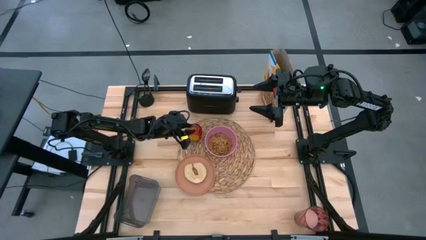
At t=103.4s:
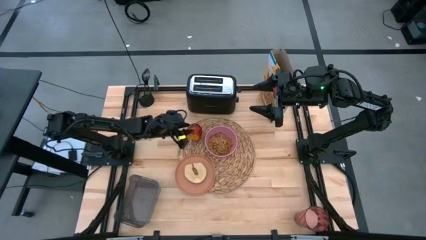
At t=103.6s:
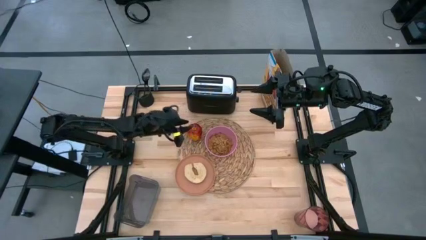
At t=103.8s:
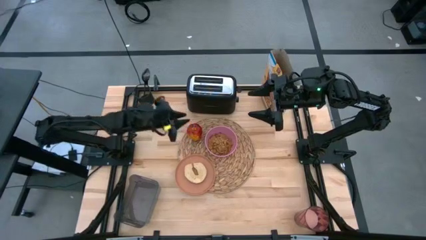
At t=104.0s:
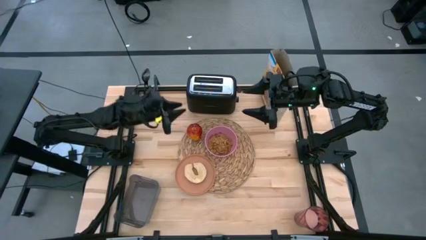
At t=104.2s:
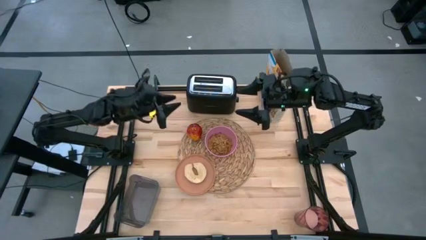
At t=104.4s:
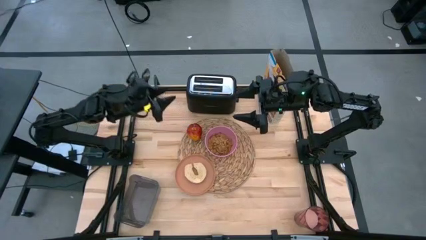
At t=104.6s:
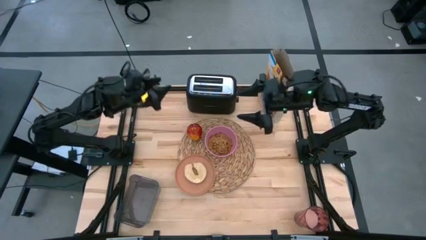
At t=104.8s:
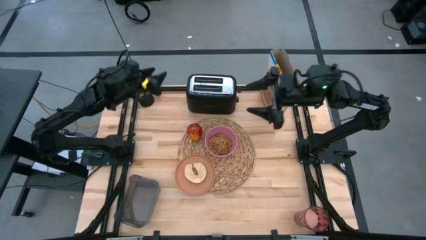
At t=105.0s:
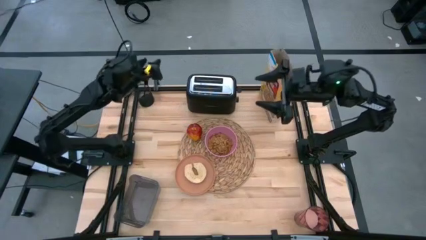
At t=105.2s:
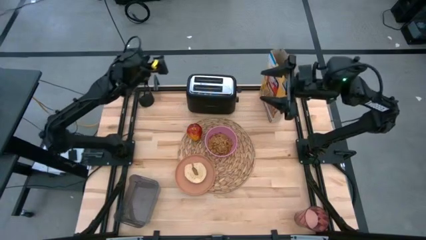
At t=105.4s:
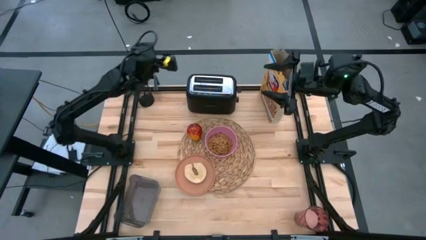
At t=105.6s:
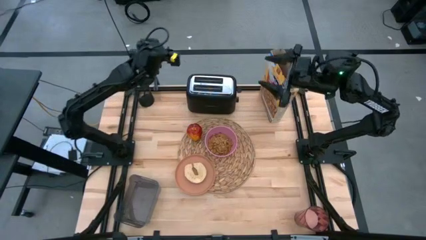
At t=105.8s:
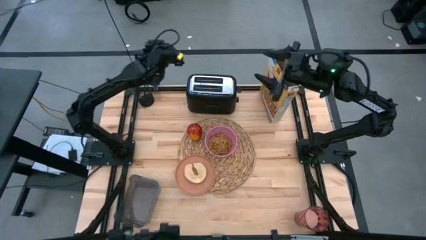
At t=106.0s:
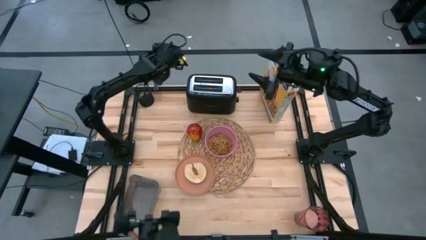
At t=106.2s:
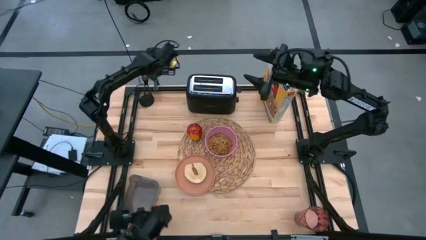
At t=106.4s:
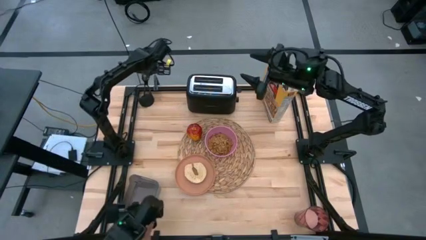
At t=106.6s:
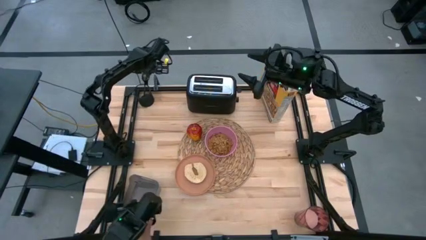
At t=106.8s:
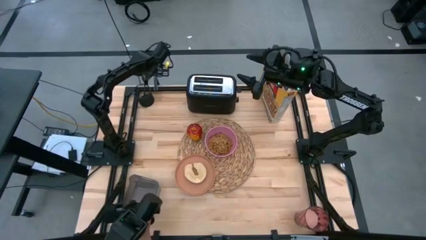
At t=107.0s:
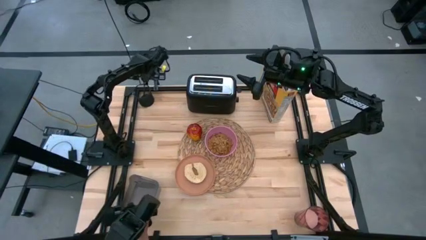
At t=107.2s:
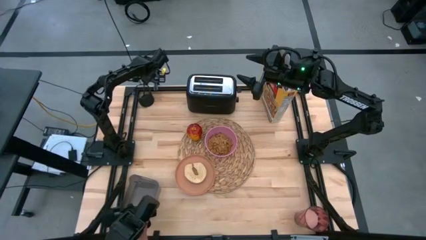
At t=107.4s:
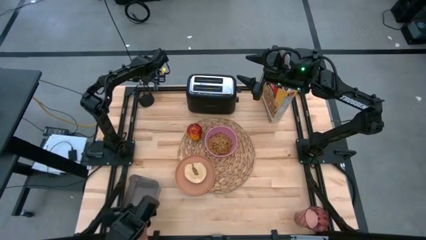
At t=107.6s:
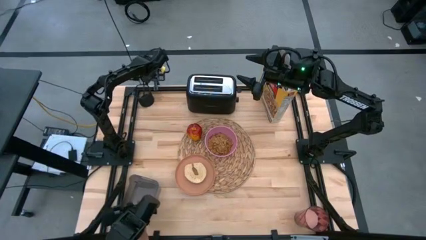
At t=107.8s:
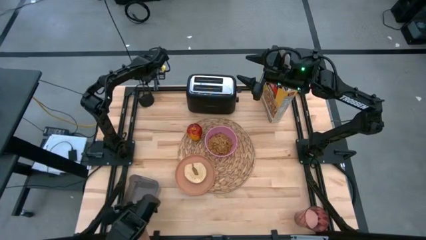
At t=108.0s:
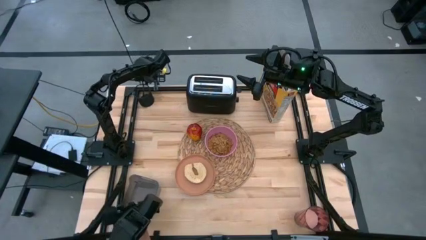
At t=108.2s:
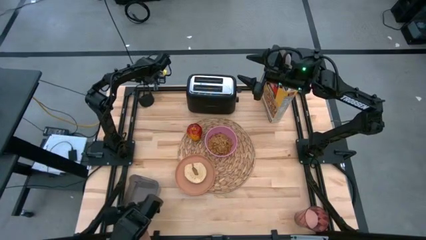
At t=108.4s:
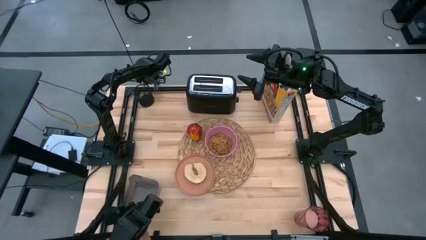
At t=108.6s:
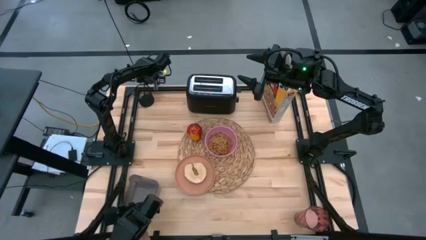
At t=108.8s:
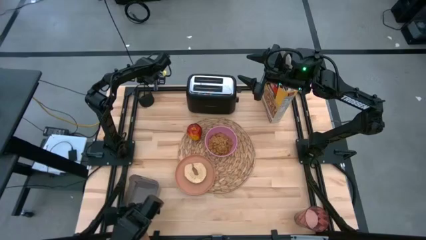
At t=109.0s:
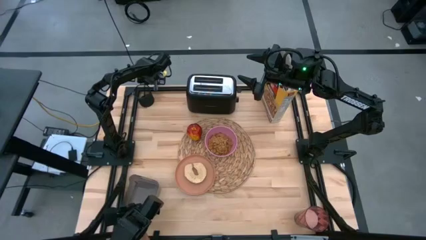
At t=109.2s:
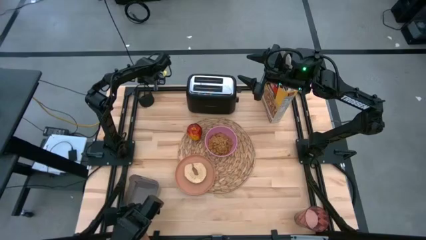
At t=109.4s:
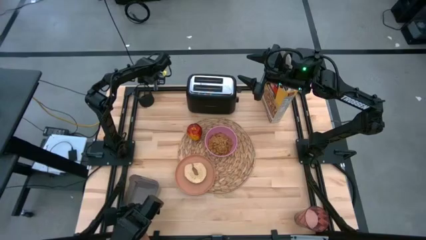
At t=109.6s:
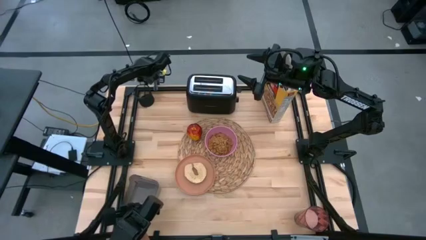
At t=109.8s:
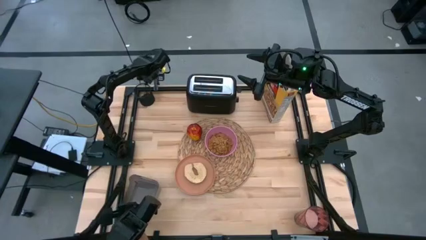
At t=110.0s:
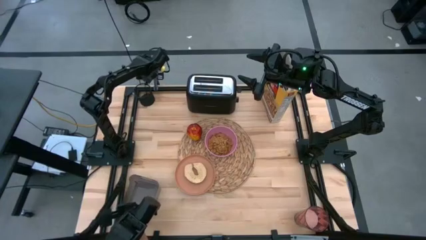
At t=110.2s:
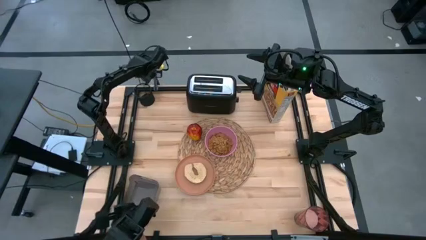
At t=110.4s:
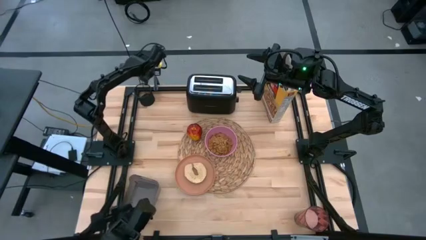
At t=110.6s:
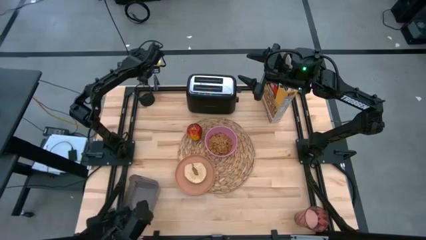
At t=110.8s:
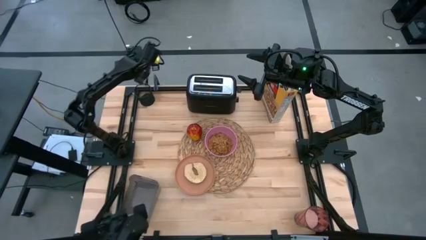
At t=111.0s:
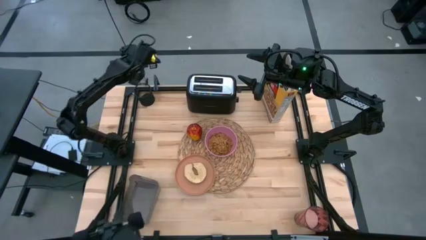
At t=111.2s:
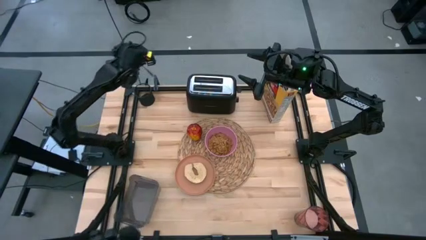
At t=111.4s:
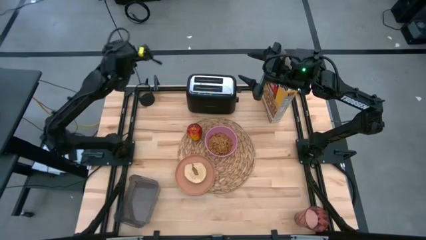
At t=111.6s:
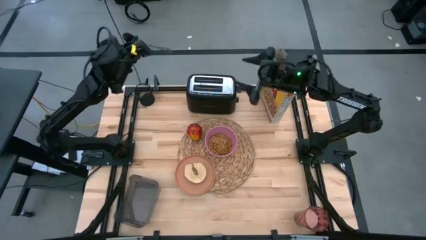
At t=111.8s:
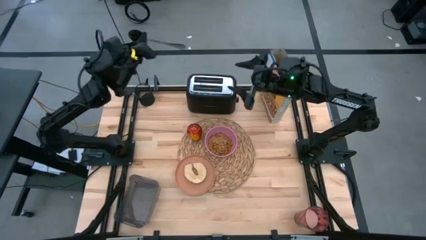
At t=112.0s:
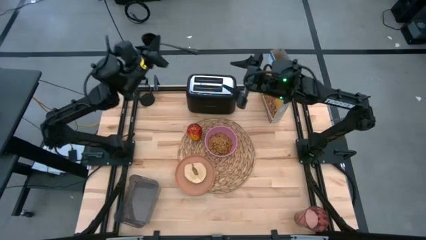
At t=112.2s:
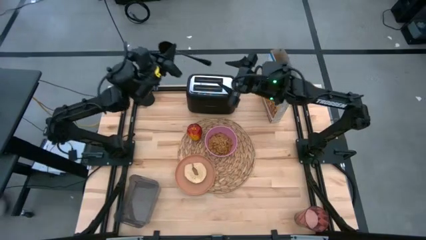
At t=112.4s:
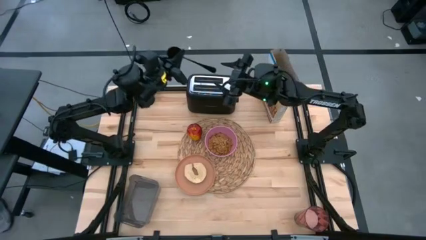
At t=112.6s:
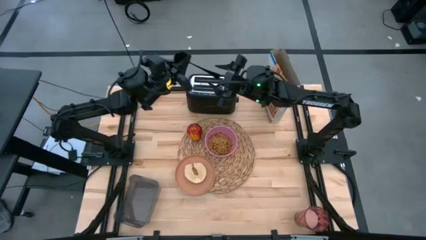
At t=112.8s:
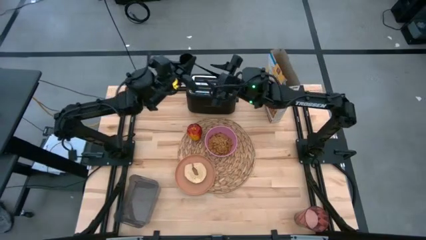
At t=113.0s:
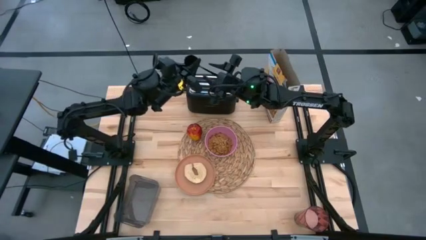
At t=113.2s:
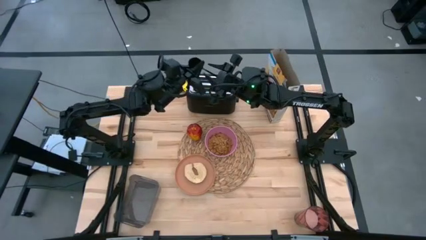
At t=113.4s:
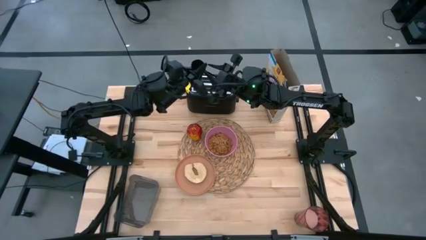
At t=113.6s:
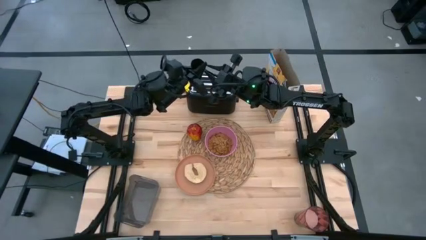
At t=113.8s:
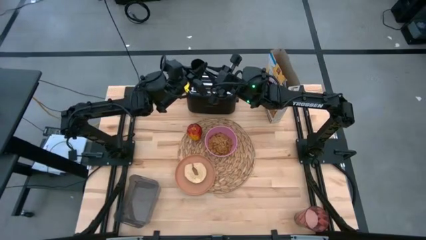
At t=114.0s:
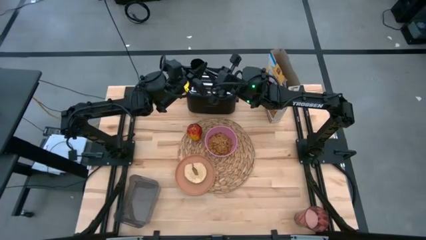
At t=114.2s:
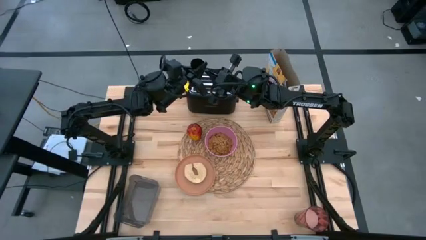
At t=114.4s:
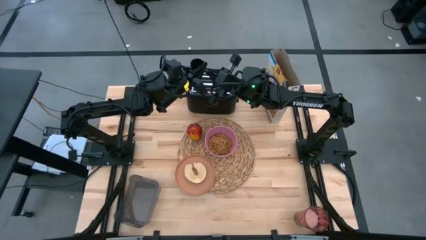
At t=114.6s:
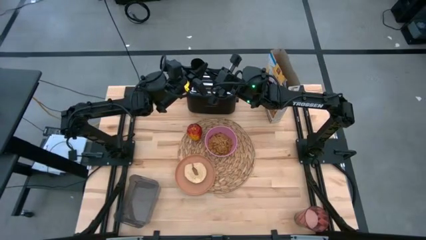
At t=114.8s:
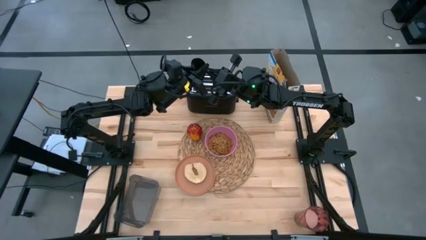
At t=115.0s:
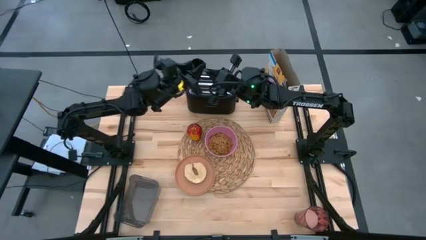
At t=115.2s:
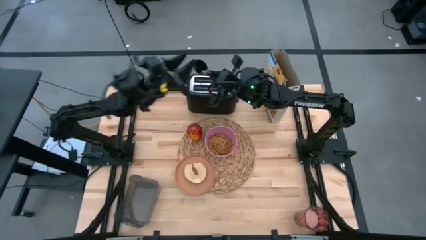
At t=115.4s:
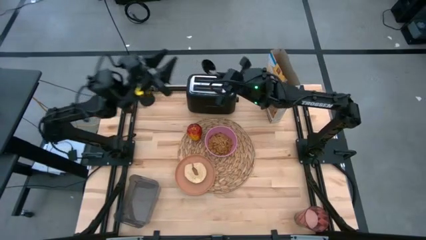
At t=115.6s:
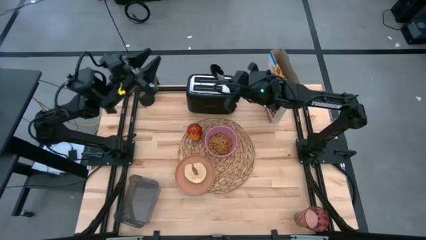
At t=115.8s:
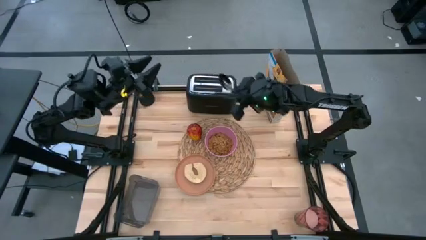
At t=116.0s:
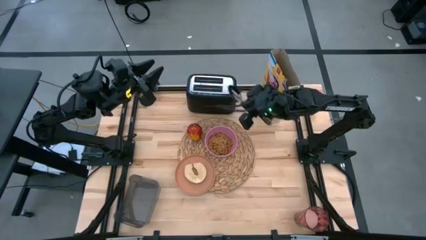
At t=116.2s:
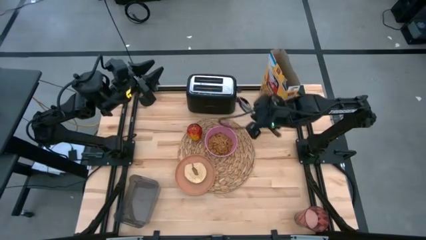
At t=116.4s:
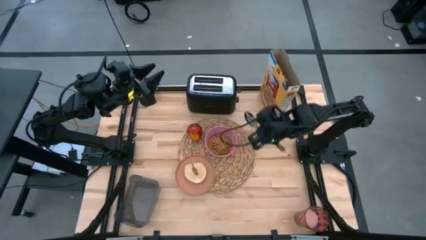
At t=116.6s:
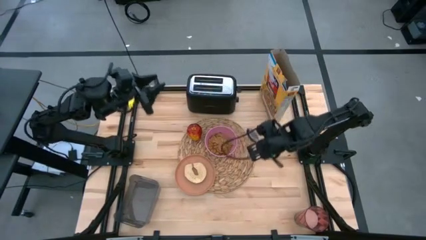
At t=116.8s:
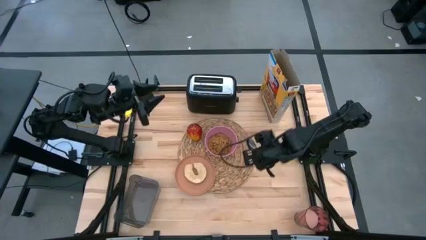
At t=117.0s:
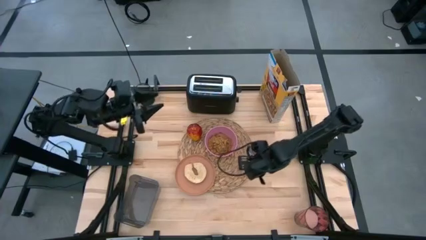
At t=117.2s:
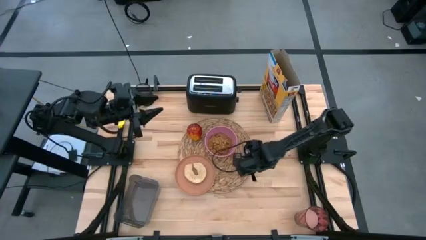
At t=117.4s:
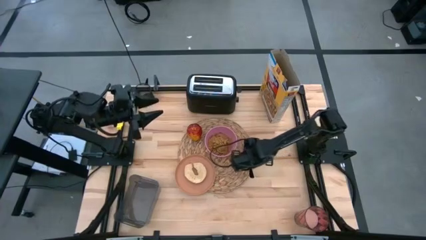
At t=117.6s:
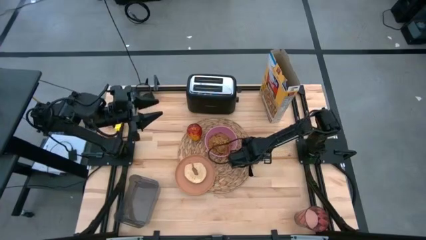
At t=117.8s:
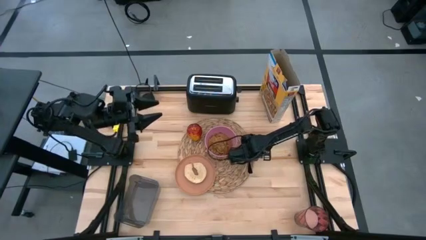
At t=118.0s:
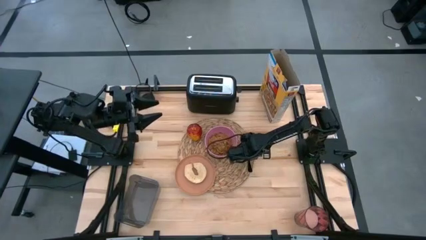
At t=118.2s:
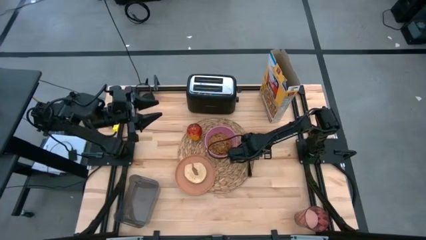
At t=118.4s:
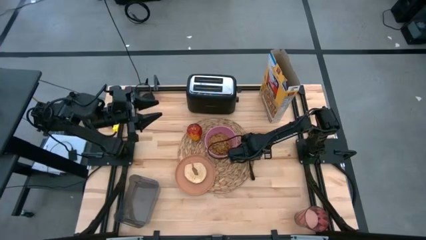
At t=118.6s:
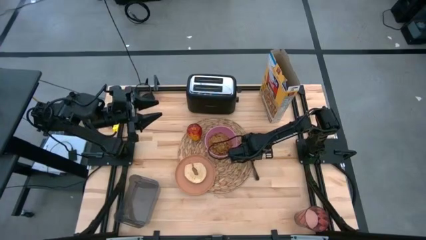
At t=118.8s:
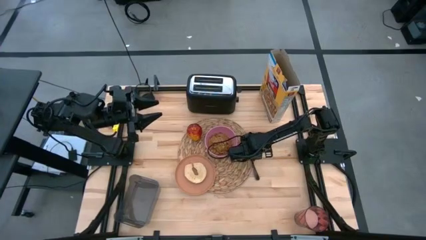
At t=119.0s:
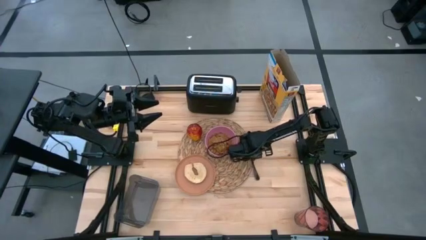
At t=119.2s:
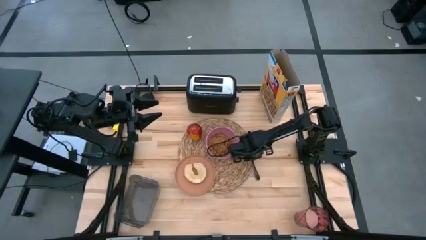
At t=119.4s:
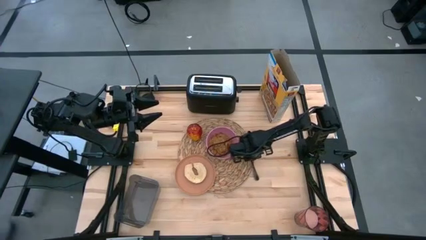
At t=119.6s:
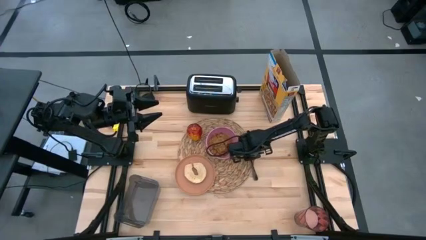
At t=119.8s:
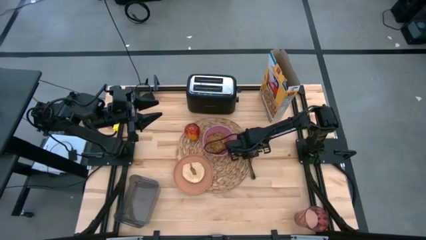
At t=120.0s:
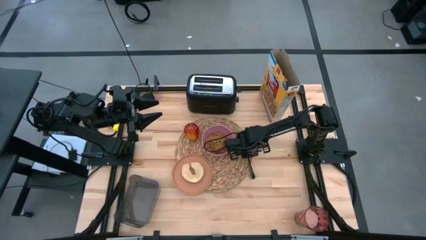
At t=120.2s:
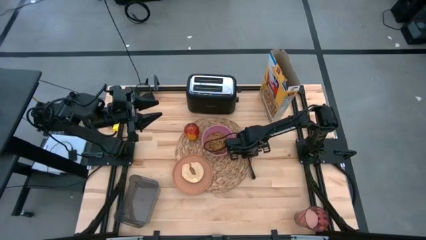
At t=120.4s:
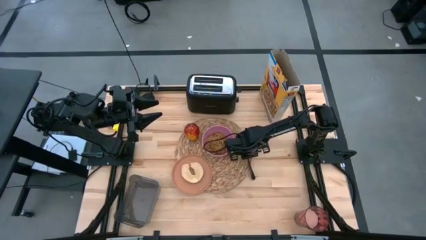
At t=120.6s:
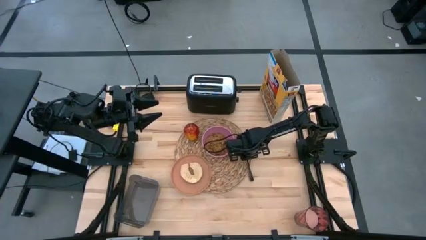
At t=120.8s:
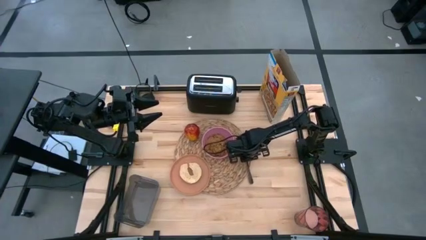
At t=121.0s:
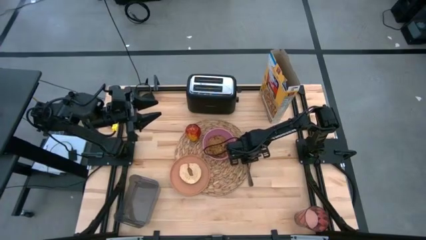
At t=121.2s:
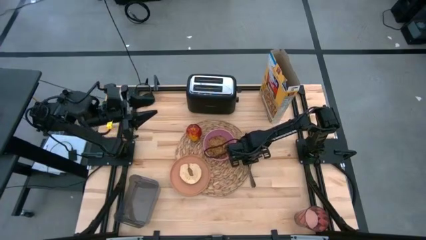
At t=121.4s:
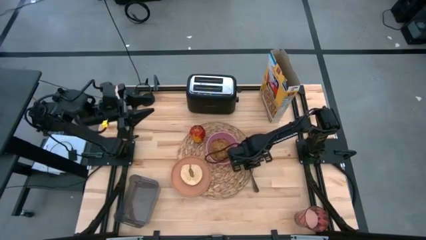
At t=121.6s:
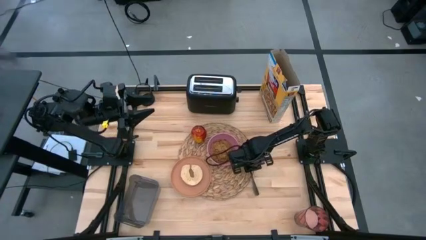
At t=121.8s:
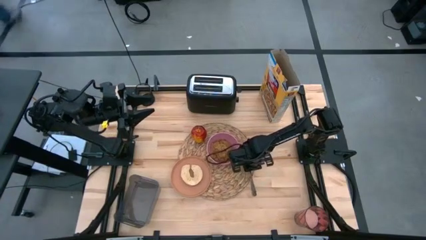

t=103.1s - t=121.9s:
Task: Arrange a breakfast setting
Put the black spoon on the brown placemat to the right side of the pink bowl
